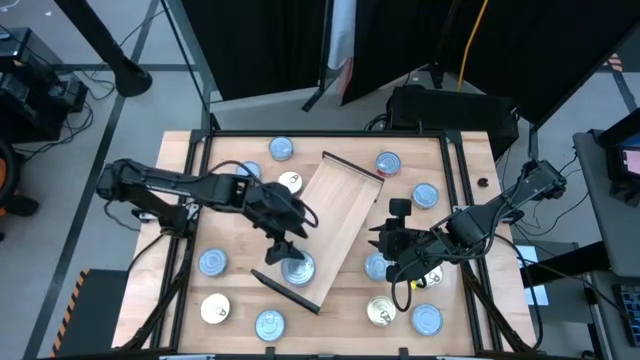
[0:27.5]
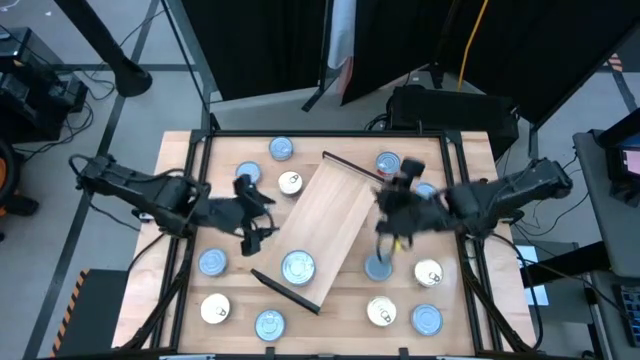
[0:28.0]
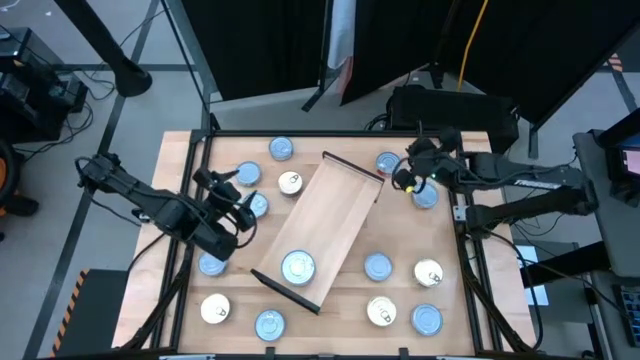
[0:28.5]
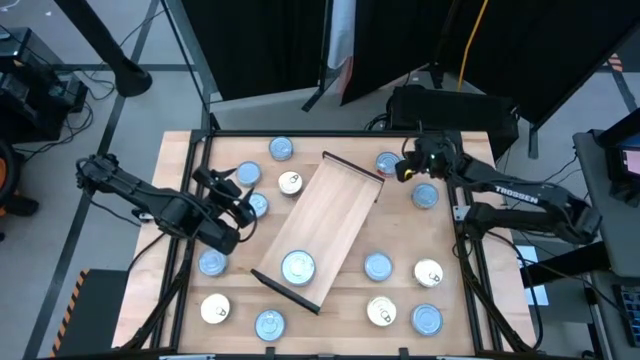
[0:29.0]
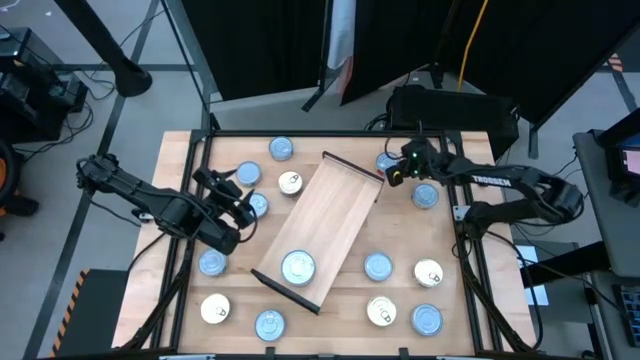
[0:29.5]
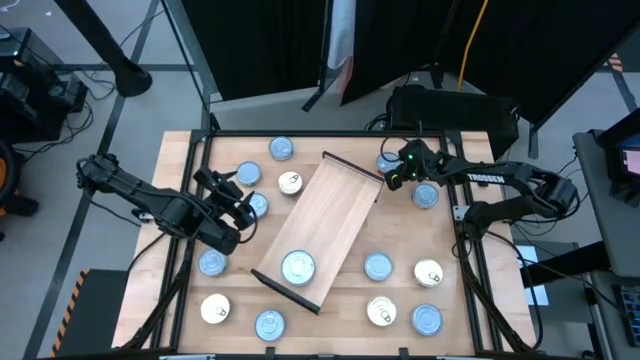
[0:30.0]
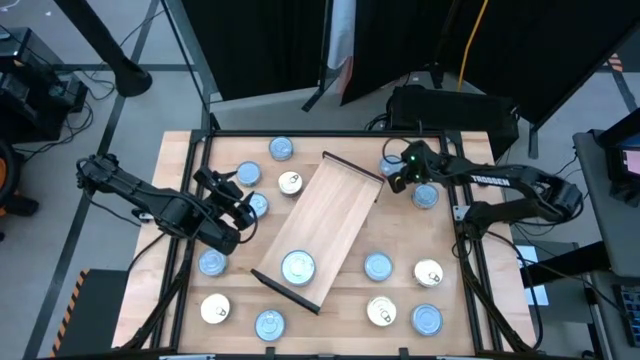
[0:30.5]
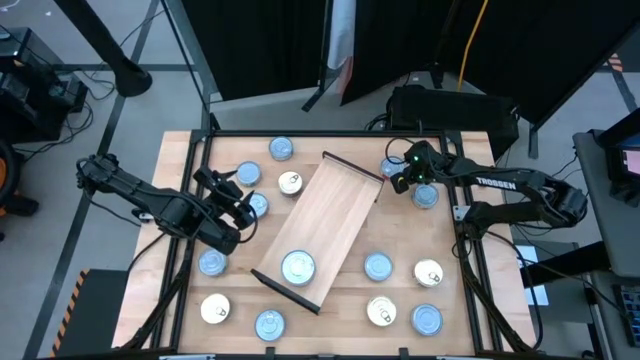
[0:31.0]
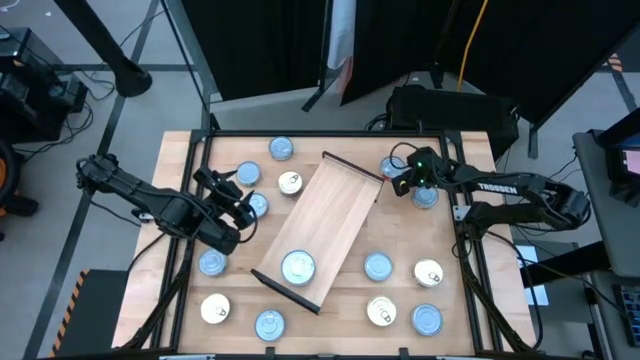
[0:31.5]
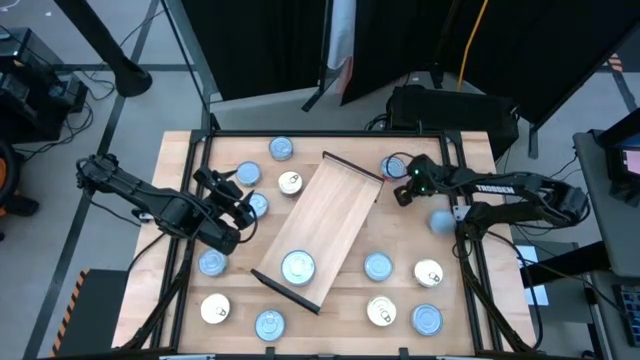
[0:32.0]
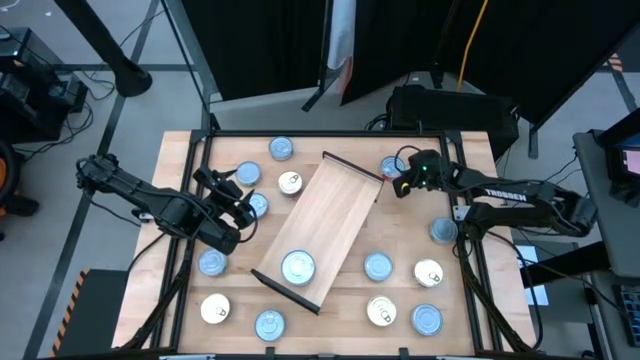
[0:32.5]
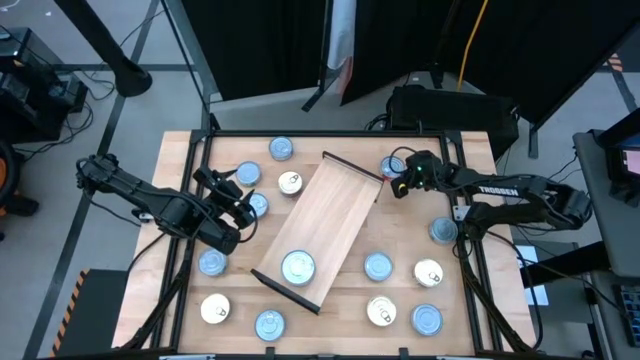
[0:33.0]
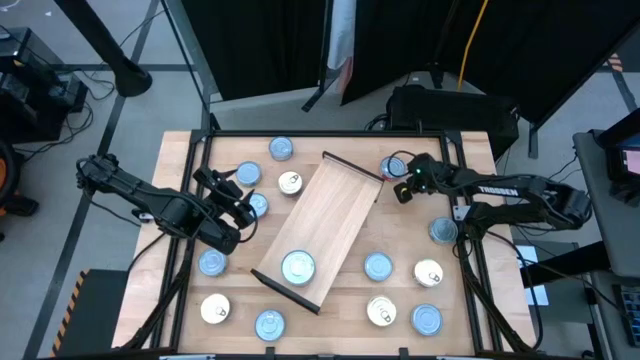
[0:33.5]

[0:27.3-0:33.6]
Task: Stack canned seafood by type on shelf
Stack the red tuna can on top of the other red tuna can

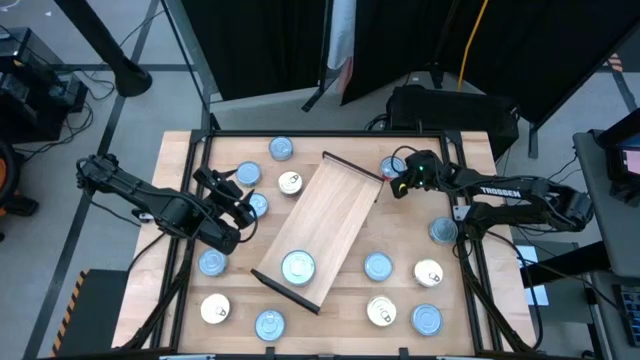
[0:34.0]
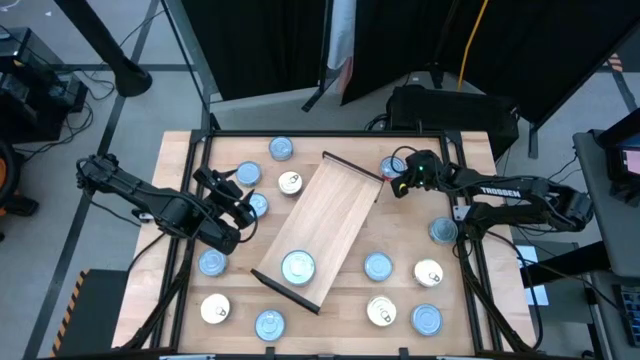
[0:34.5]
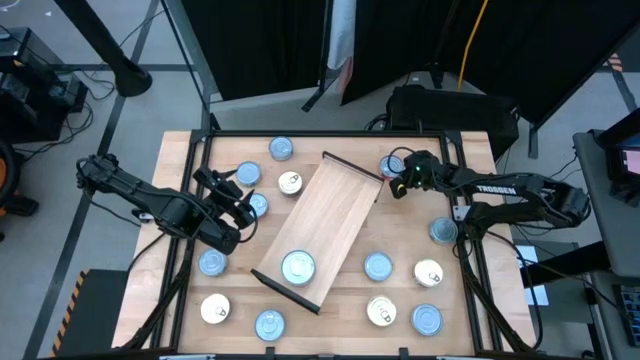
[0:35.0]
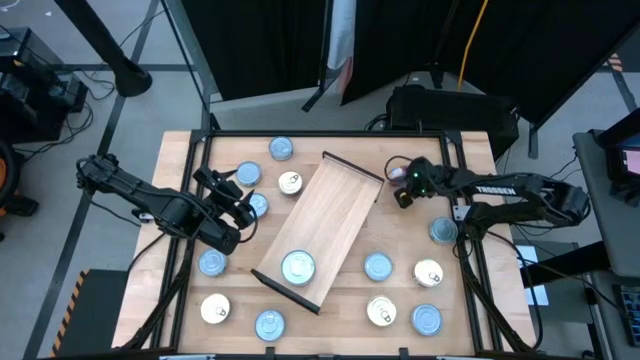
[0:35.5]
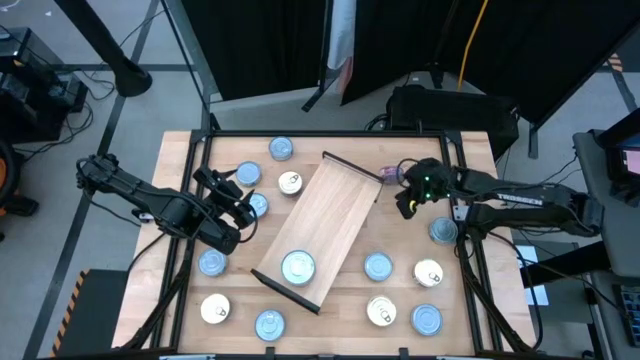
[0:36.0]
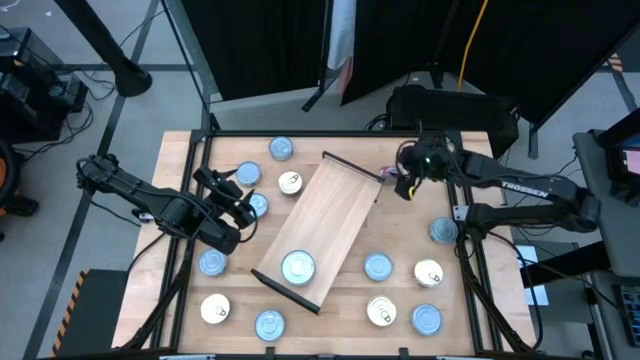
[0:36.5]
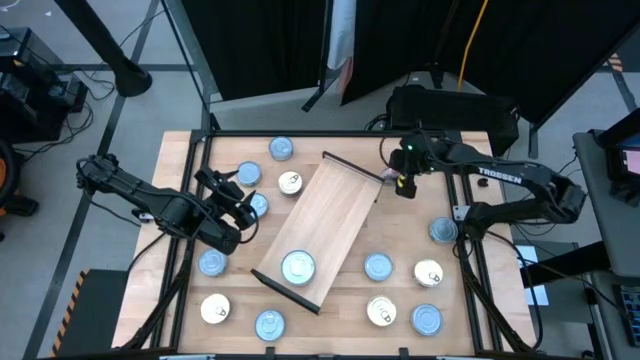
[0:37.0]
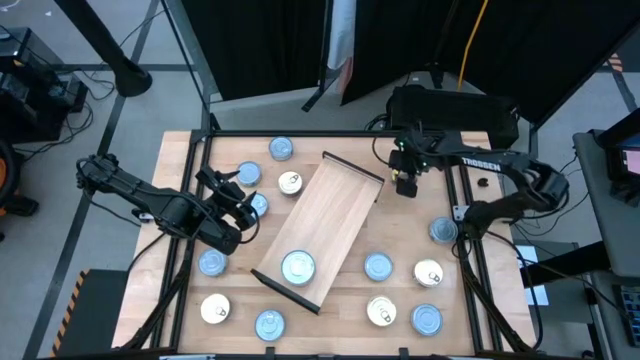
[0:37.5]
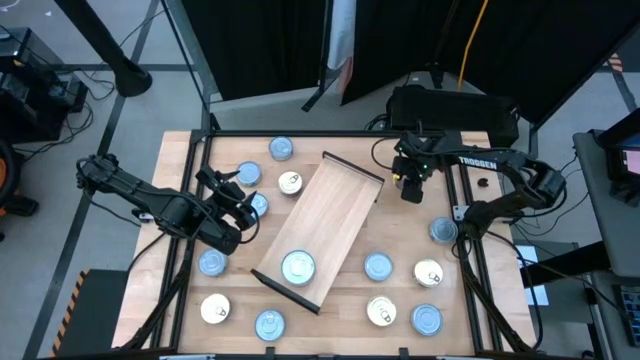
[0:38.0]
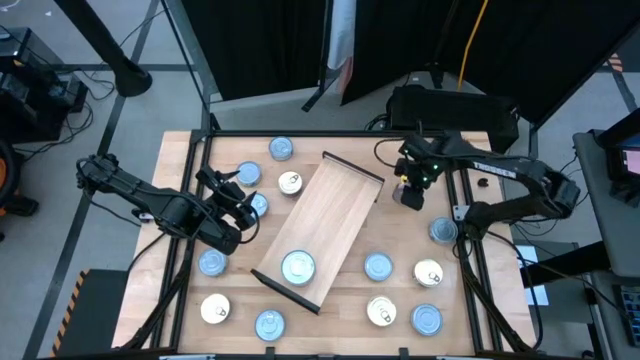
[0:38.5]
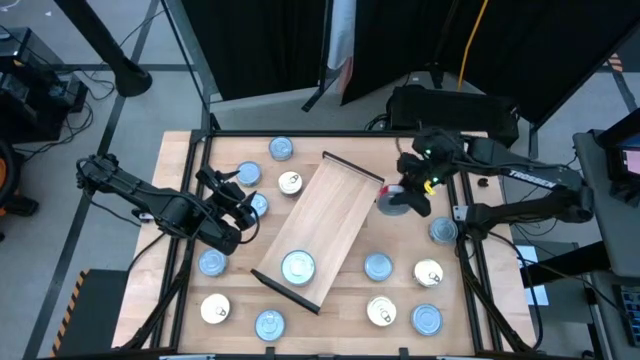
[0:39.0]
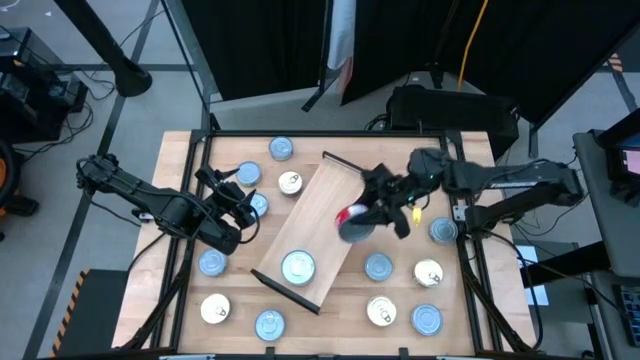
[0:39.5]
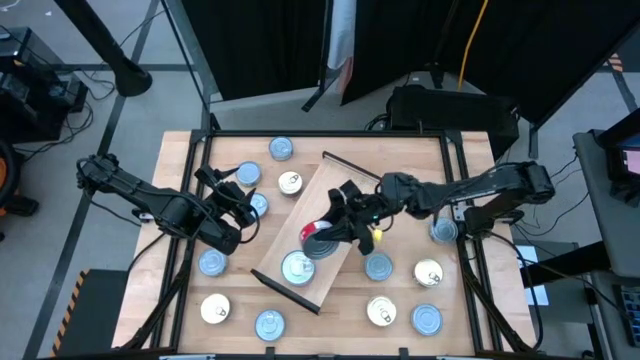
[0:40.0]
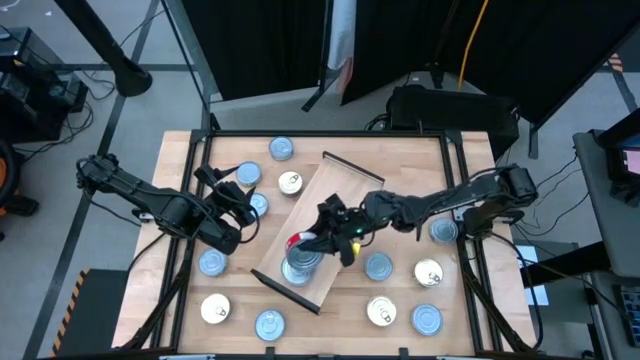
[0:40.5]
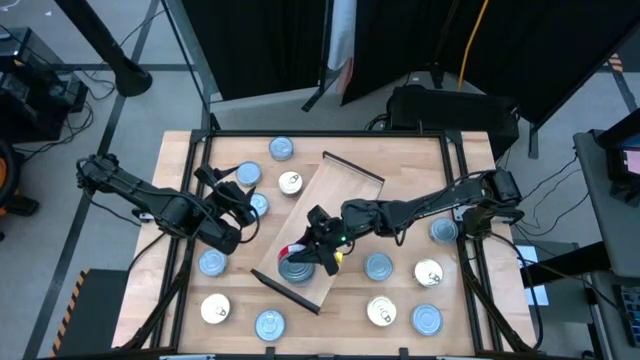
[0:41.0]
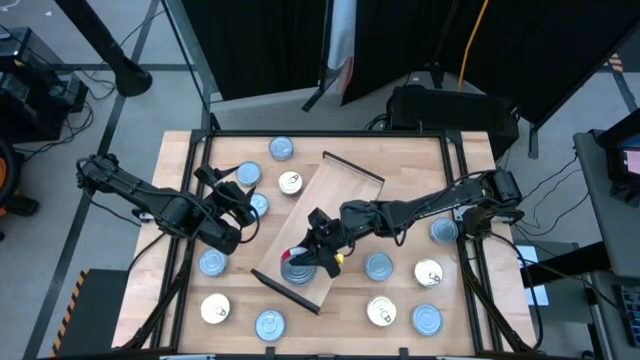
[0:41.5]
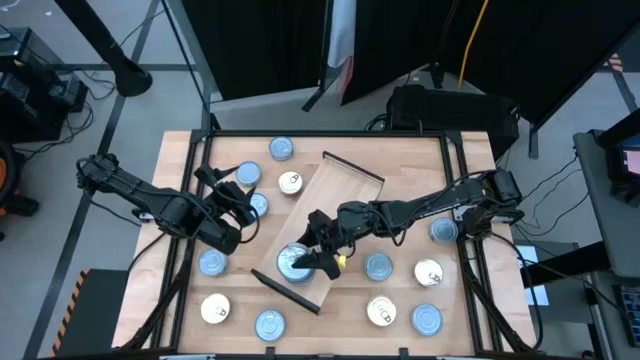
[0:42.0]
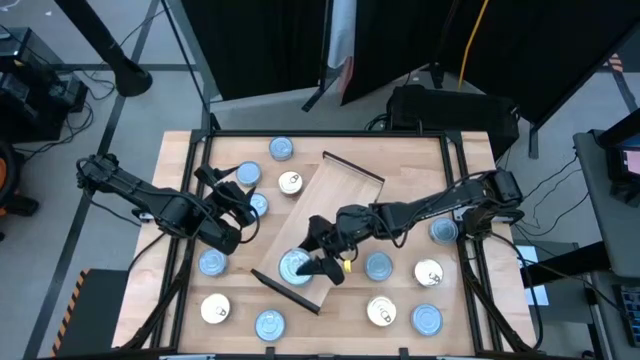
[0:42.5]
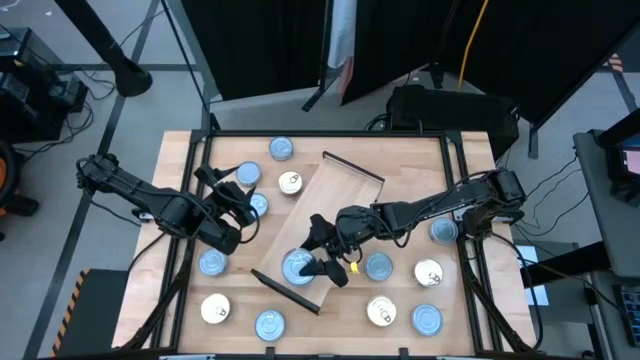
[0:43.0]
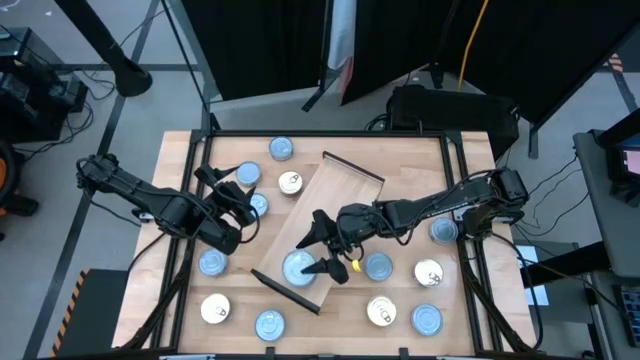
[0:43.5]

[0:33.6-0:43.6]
Stack the red tuna can on top of the other red tuna can

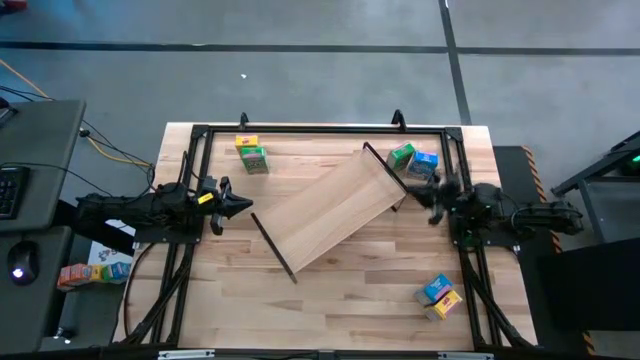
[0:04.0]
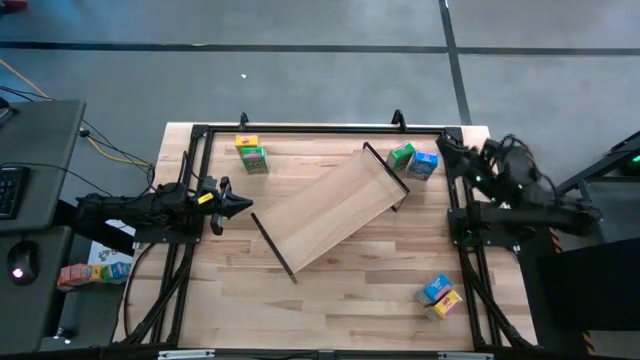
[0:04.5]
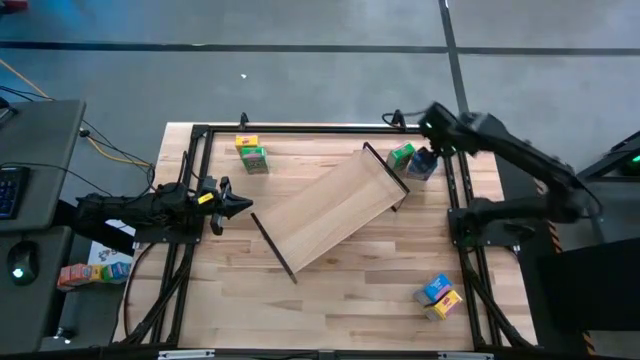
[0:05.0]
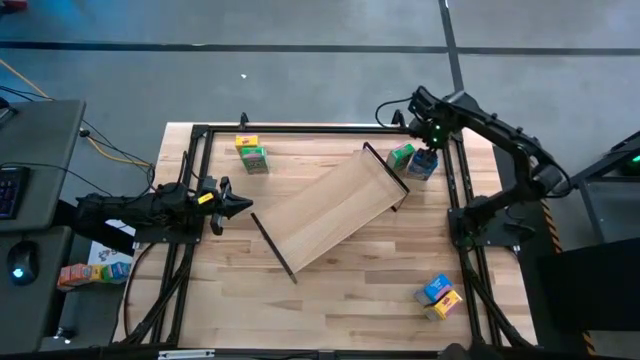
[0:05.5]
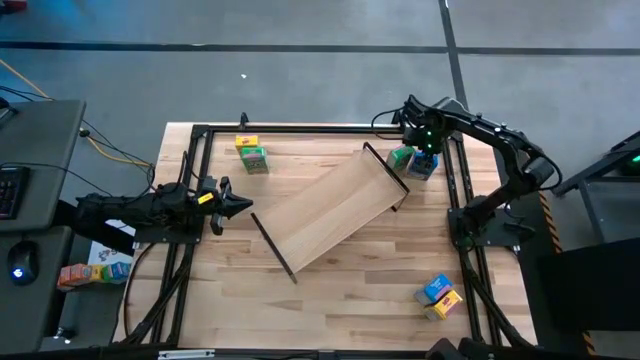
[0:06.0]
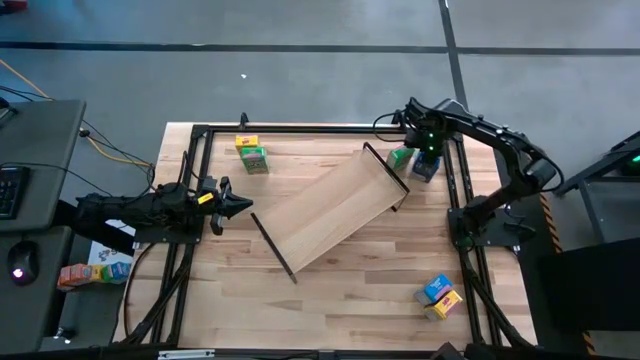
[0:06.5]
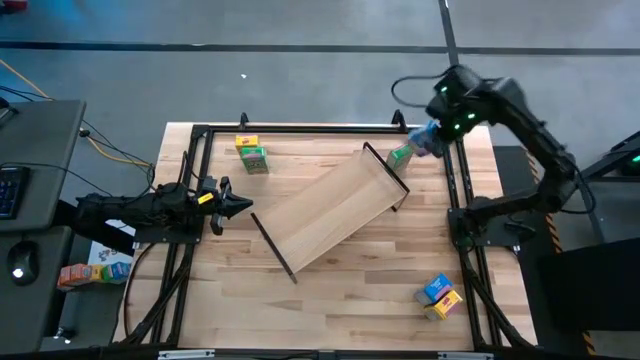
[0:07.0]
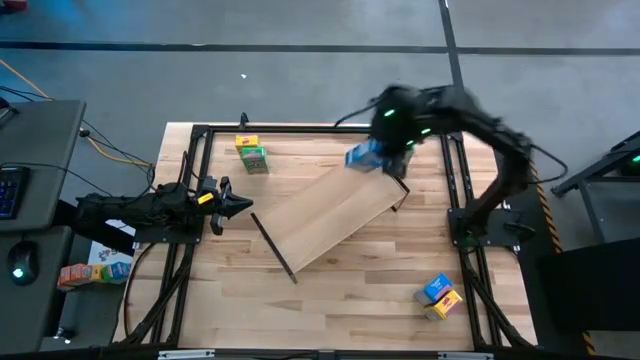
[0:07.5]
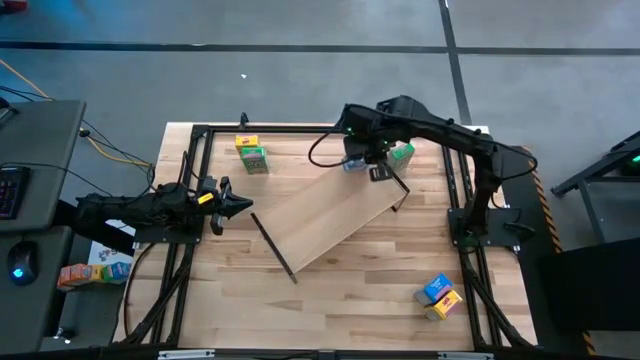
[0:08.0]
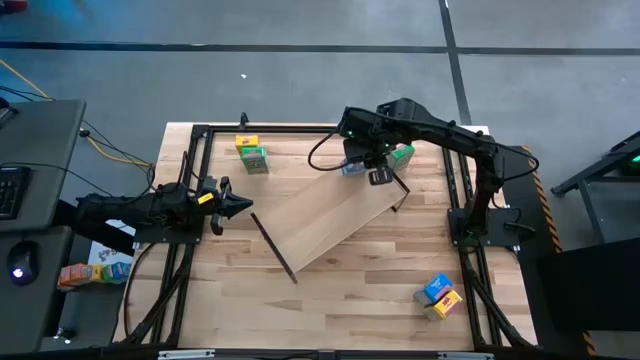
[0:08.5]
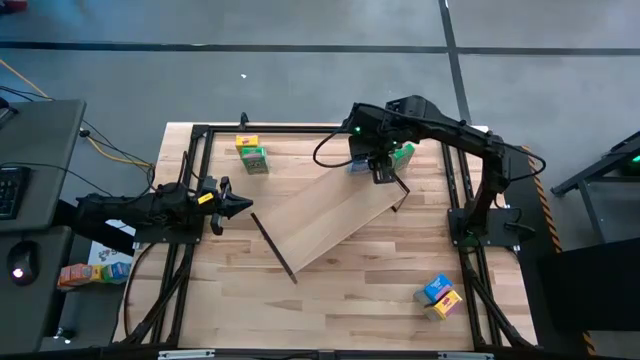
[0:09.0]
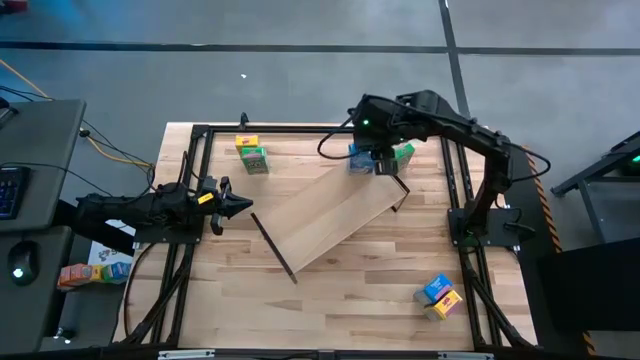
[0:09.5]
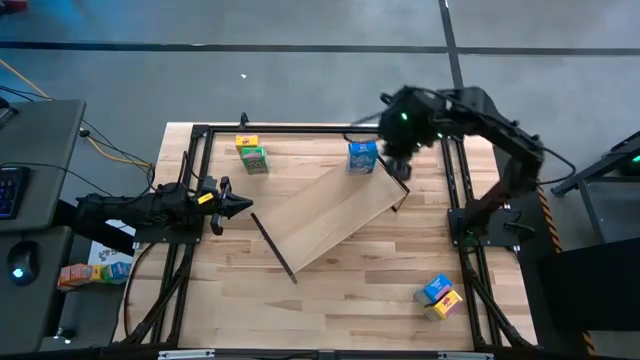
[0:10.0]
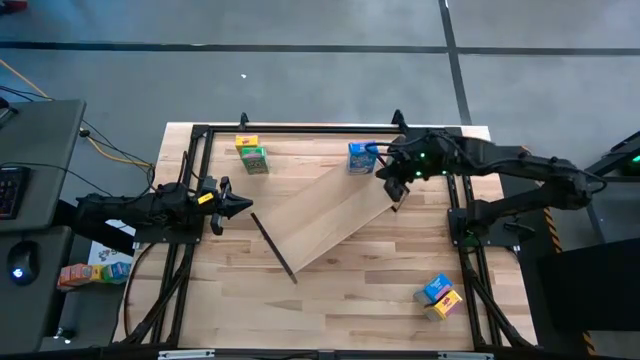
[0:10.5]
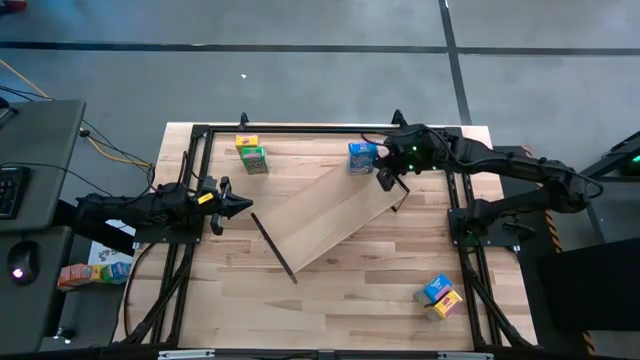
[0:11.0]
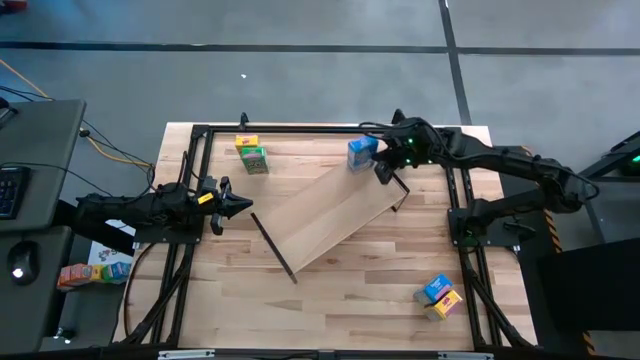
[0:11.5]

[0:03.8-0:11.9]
Task: Stack cereal on shelf
Put the top blue cereal box on the shelf
